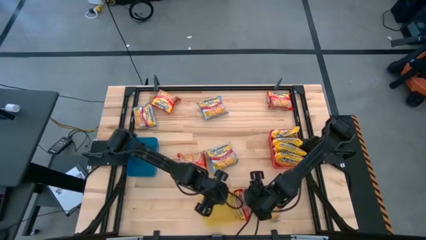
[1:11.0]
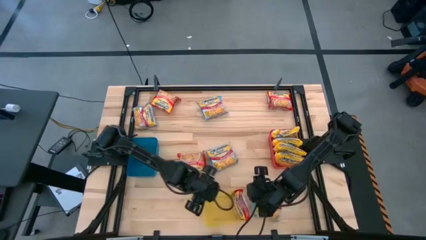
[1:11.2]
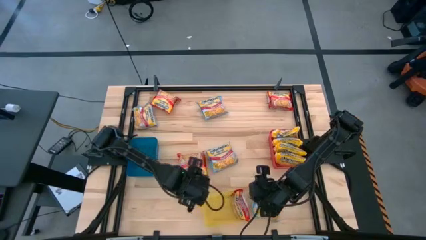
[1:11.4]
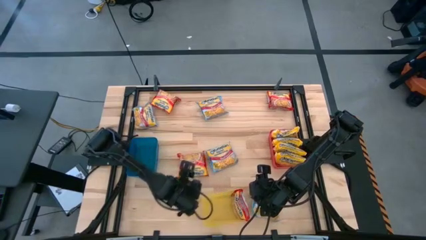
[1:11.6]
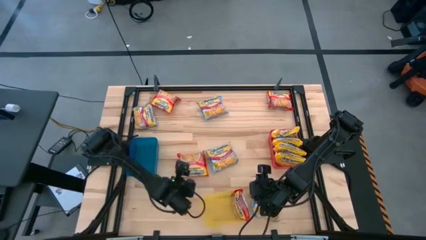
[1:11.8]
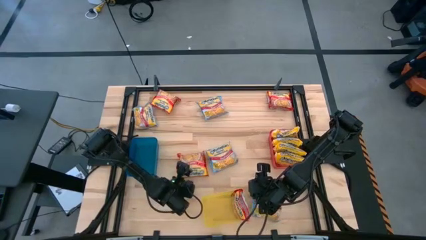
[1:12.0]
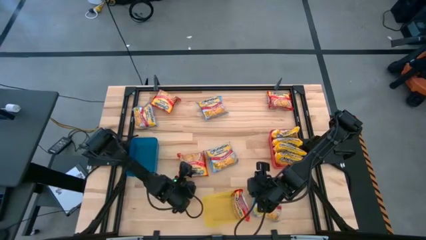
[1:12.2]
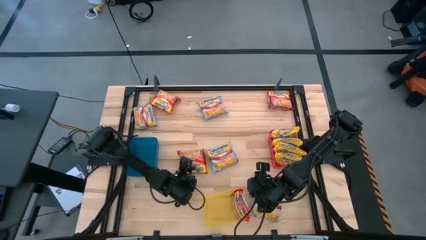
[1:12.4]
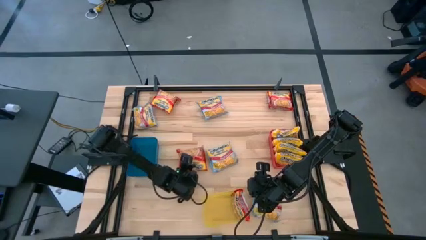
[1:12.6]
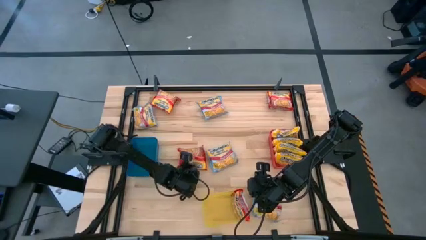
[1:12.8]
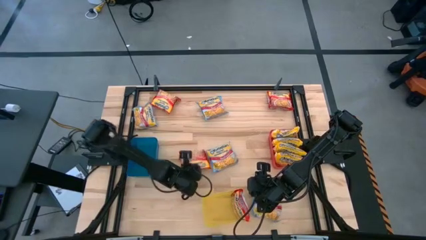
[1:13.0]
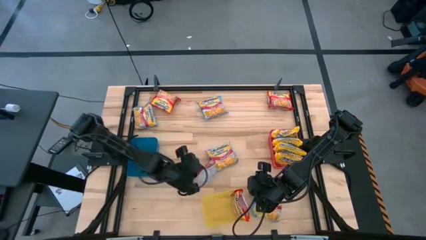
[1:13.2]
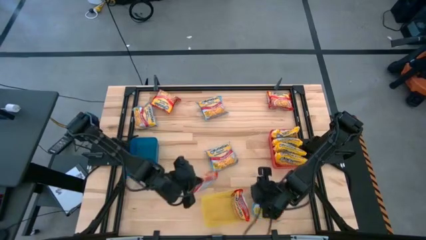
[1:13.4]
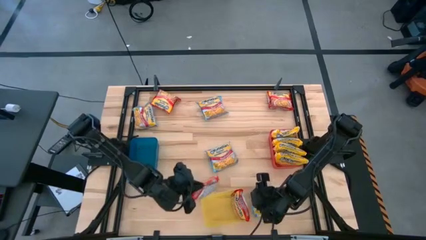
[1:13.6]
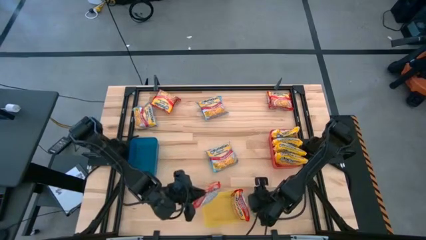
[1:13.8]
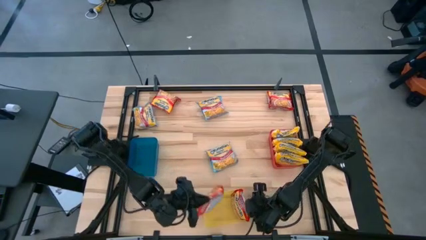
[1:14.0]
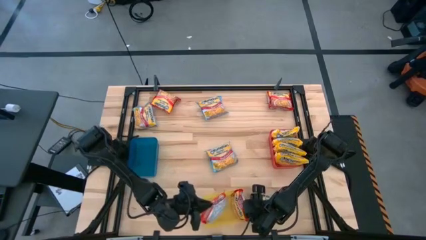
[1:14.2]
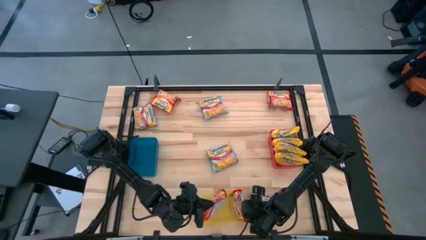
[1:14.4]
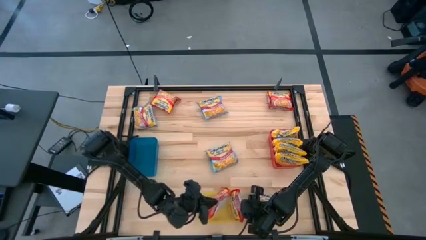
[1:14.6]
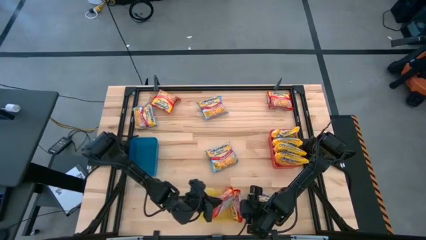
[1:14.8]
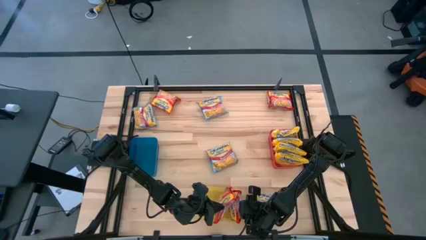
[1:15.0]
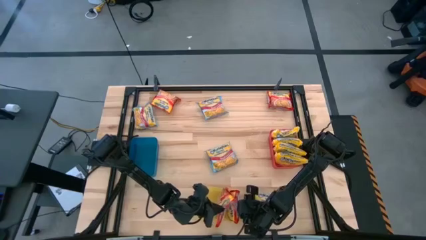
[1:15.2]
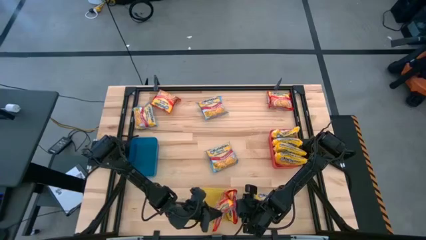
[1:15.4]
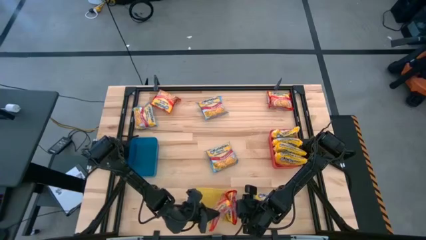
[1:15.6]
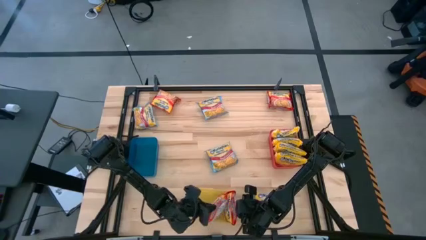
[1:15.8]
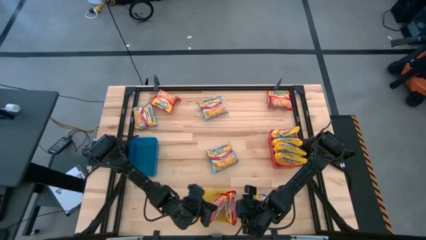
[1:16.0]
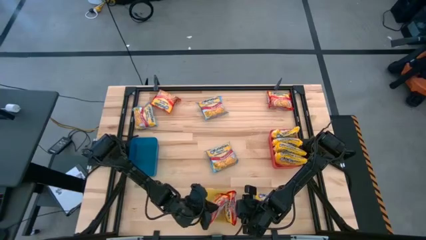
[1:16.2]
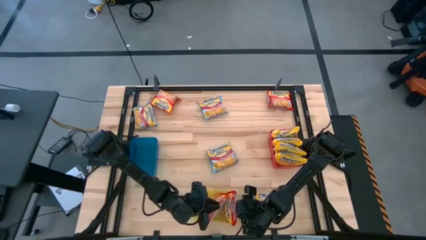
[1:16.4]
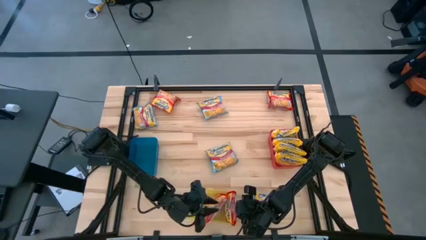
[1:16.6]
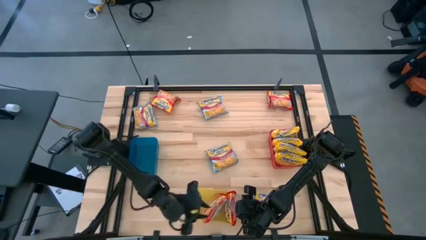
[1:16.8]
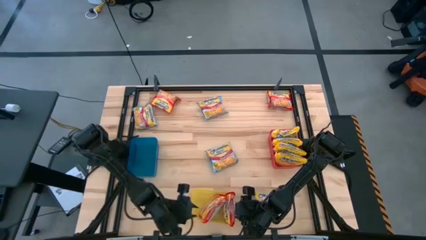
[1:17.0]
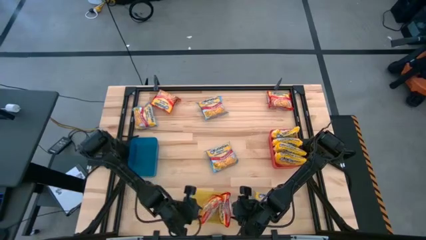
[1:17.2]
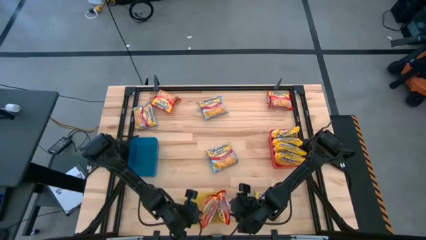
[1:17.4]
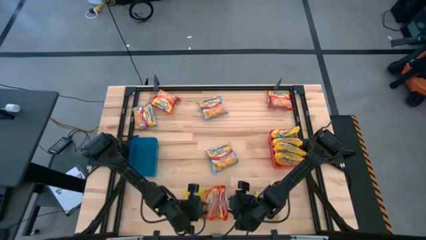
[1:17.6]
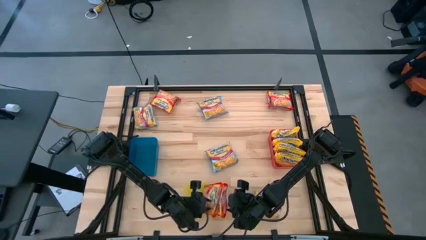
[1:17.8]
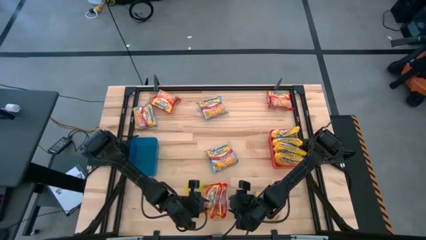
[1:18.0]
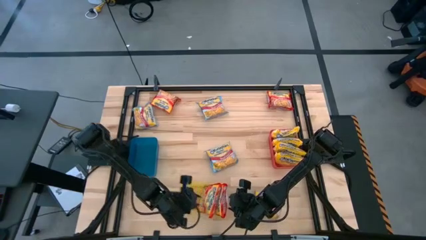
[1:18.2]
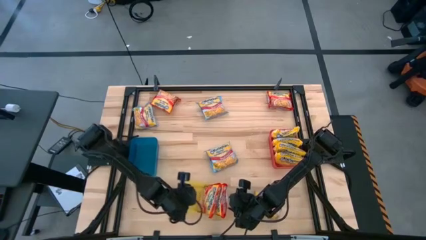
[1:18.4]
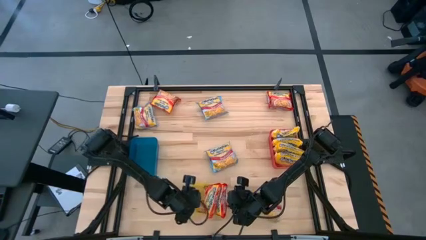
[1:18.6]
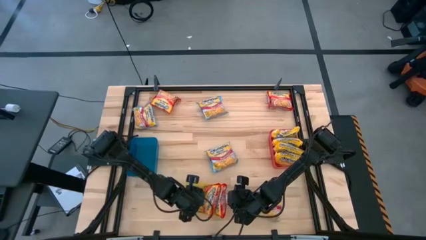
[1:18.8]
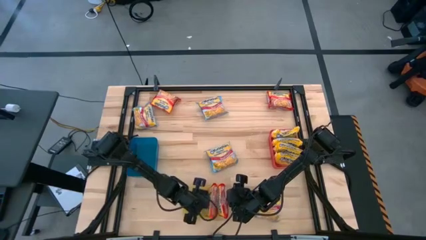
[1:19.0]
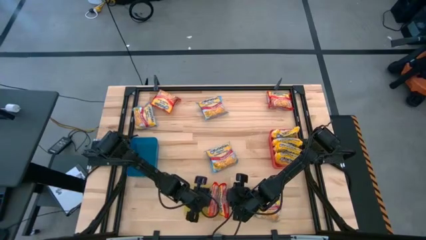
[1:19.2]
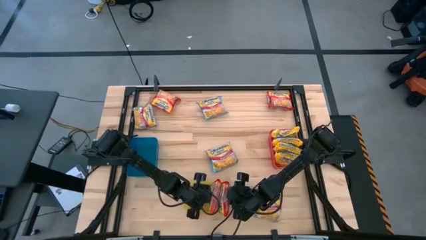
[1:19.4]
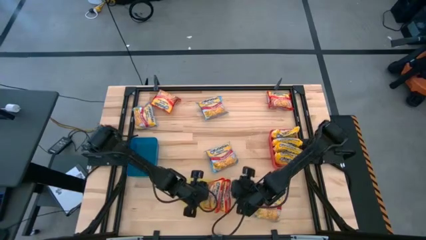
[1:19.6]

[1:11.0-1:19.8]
Task: Sort Maruchan noodles
Put the red noodle pack into the yellow bin
